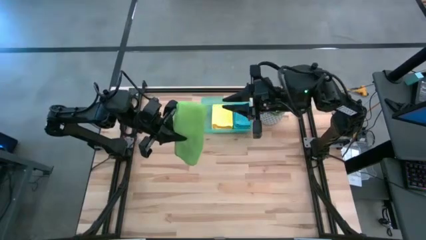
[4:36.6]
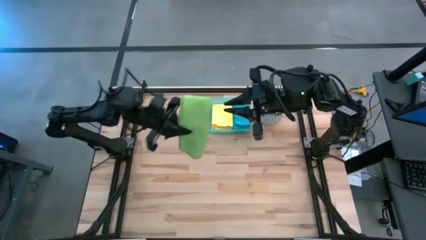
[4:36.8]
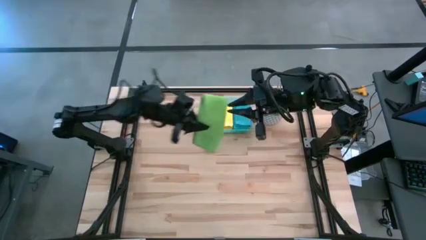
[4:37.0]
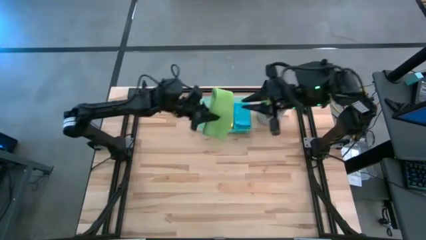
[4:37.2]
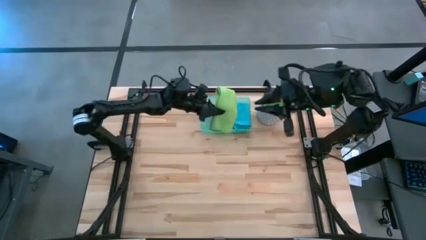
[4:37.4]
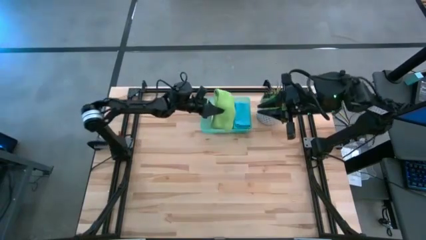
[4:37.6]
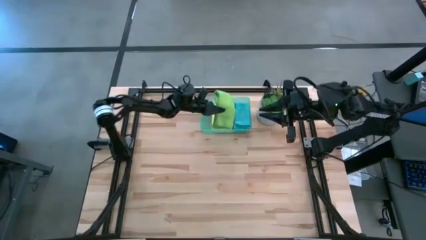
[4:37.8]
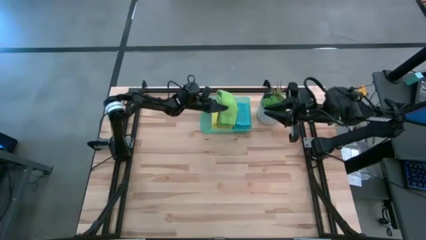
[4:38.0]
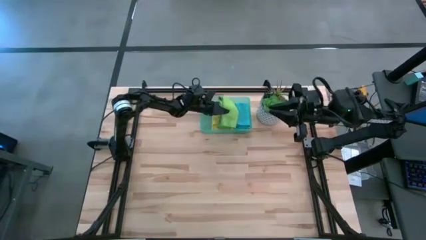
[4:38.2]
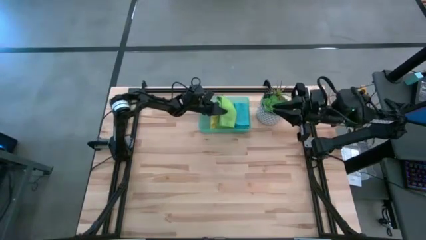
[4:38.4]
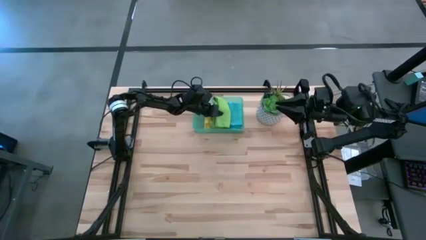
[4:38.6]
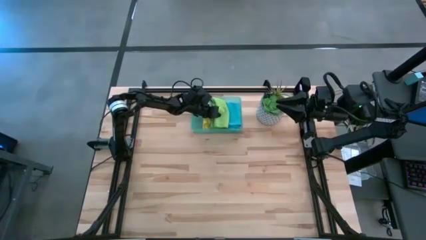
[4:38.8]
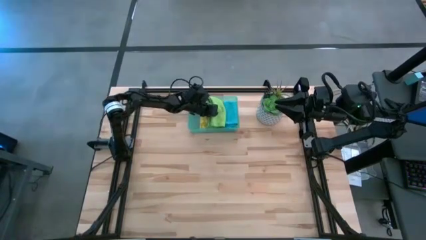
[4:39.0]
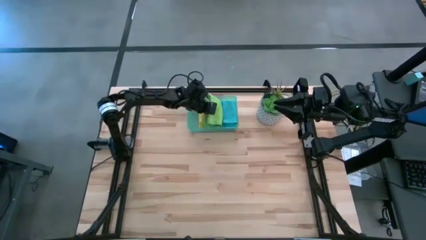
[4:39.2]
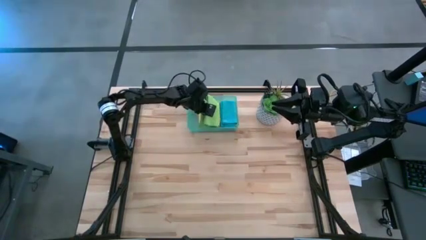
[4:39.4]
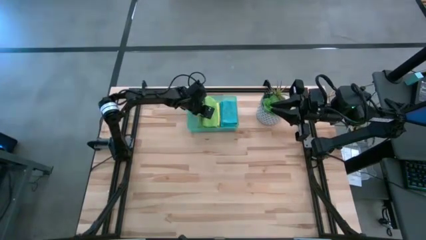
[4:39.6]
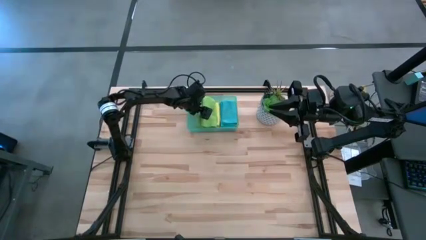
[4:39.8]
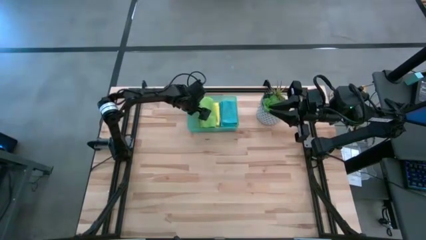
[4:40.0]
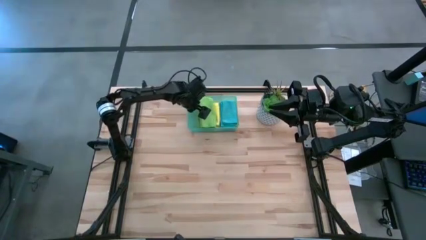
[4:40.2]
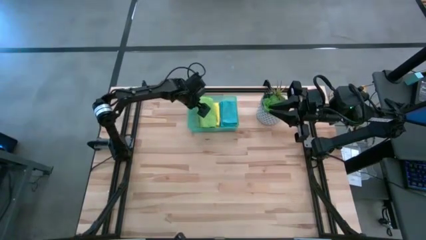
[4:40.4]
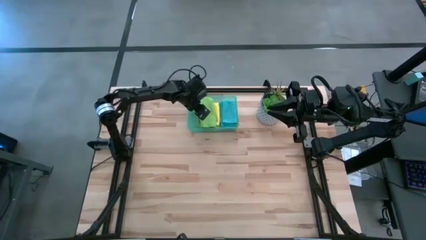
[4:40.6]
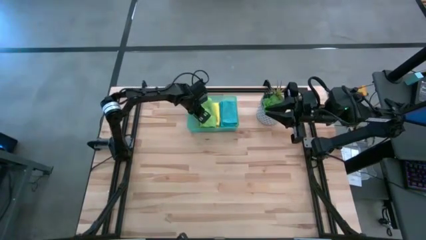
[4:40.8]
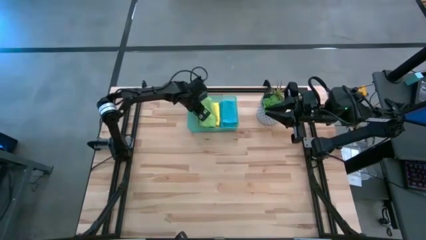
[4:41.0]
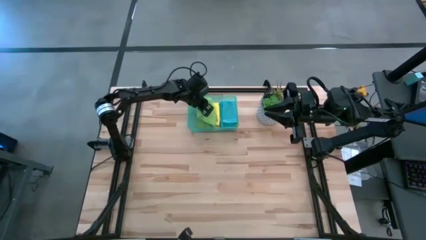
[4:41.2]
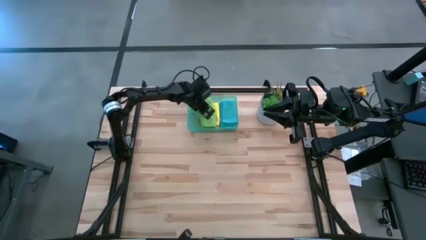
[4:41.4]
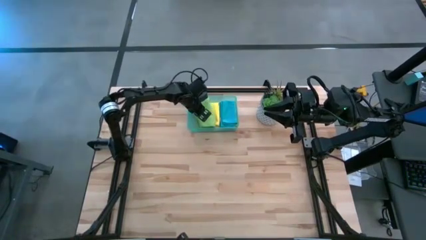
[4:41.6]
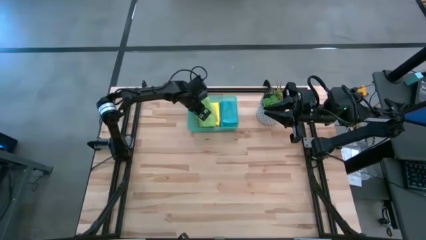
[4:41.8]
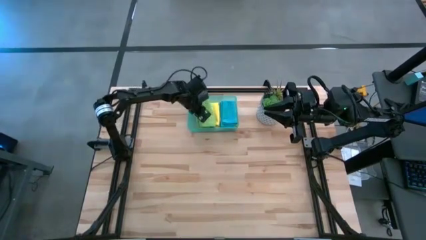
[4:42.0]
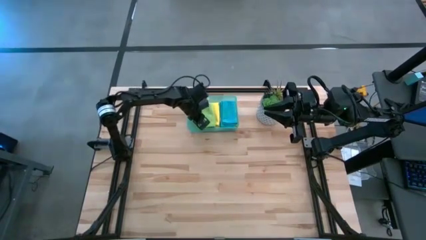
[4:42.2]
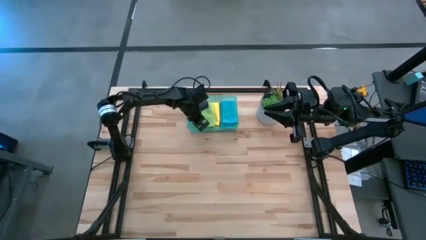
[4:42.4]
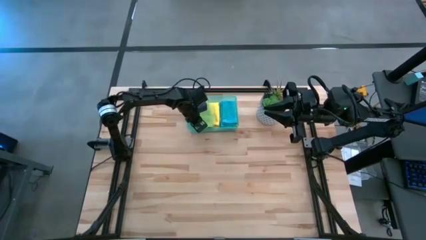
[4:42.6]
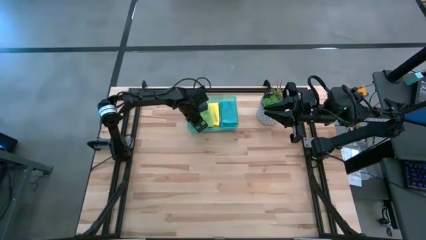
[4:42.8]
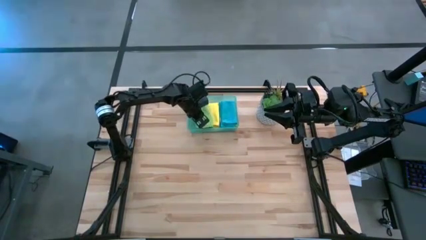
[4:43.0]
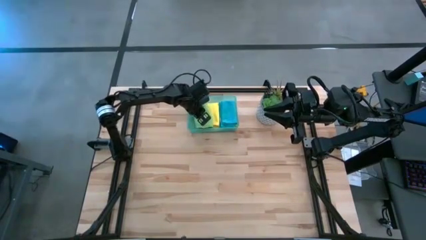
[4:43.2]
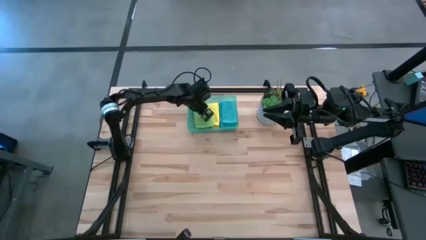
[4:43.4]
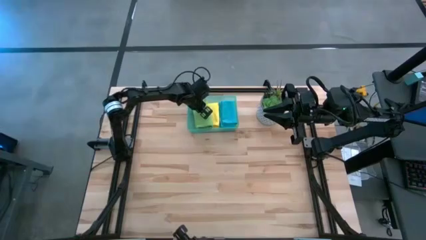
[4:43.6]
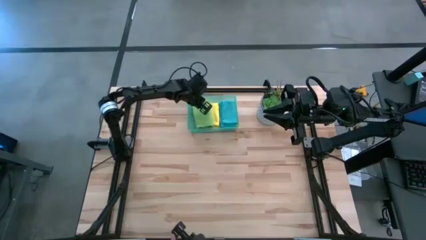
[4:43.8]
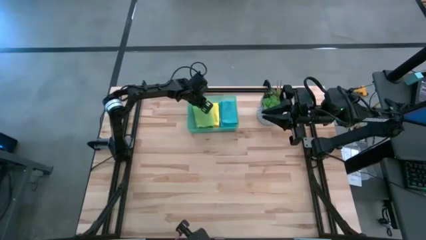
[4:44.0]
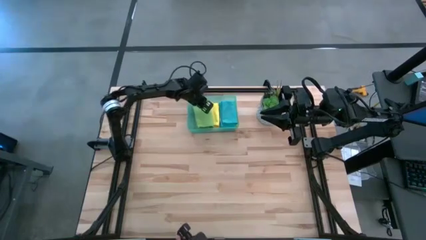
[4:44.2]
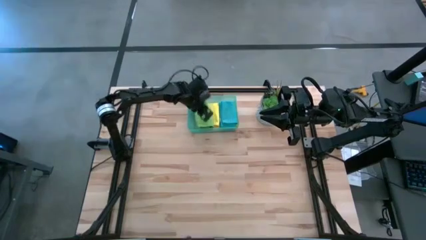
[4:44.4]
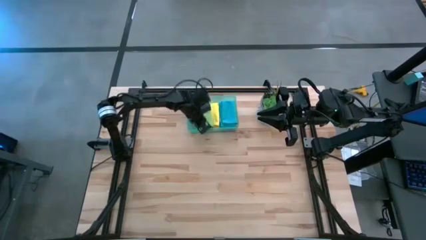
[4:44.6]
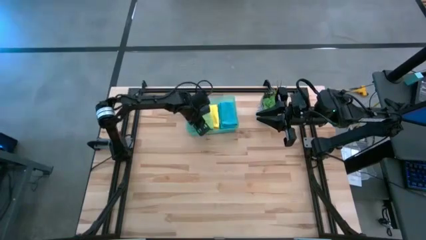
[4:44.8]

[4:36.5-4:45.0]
Task: Fold microfiber towels
Put the green microfiber cloth into the blue bin

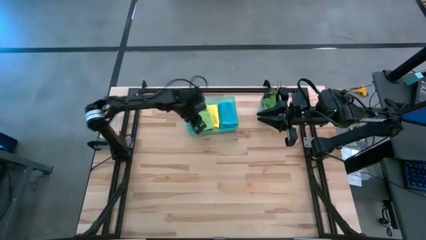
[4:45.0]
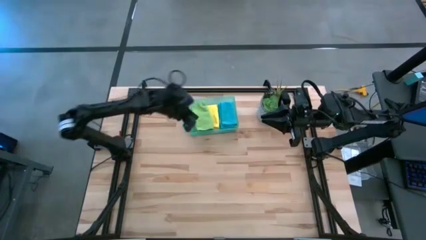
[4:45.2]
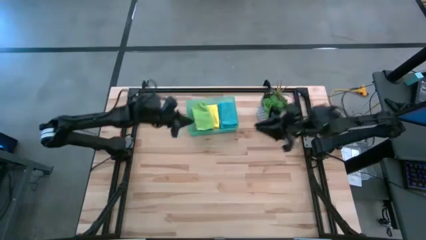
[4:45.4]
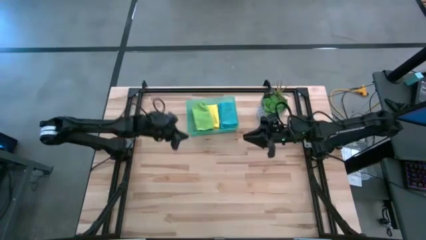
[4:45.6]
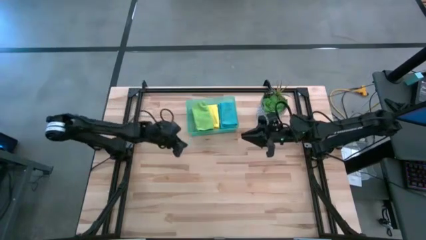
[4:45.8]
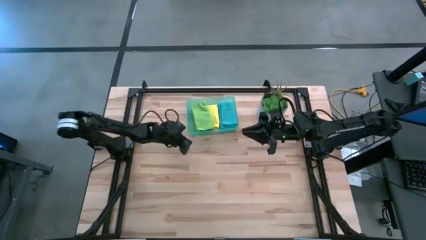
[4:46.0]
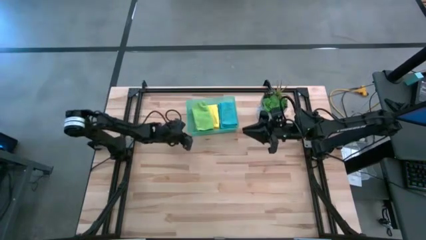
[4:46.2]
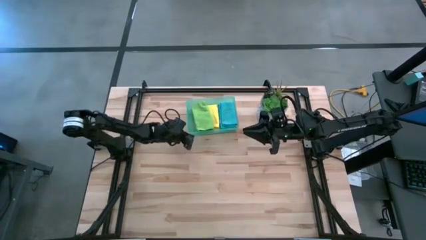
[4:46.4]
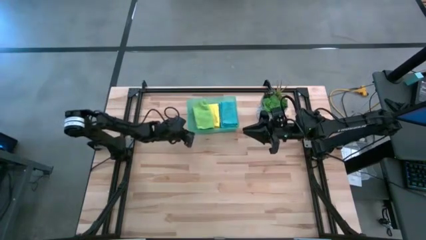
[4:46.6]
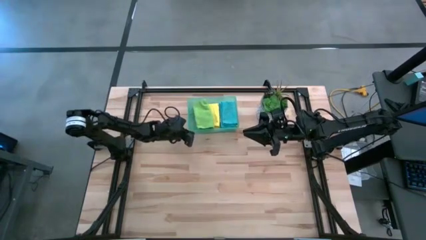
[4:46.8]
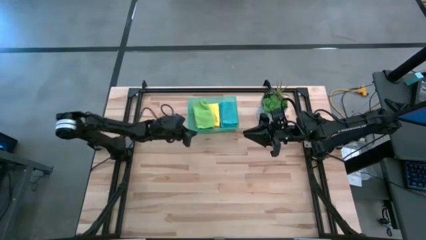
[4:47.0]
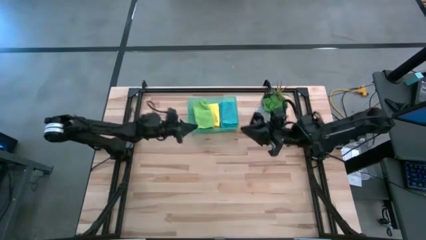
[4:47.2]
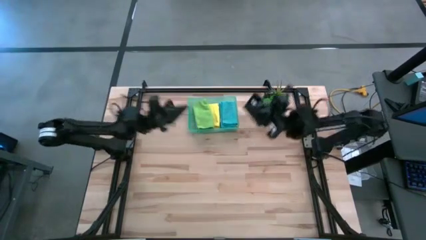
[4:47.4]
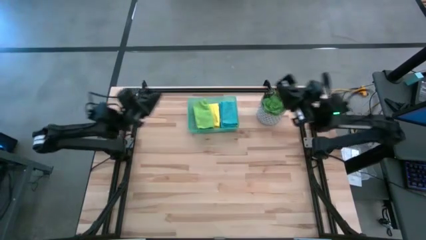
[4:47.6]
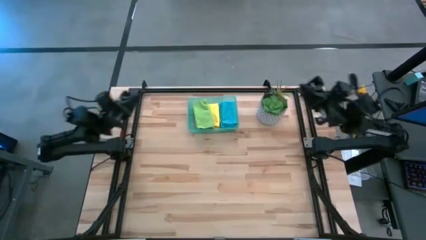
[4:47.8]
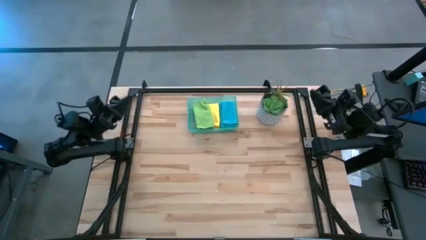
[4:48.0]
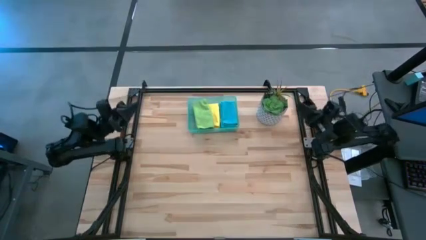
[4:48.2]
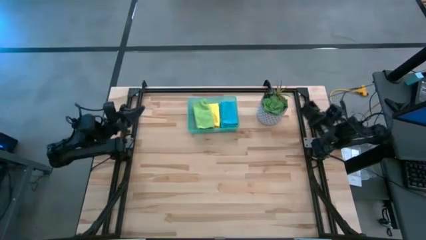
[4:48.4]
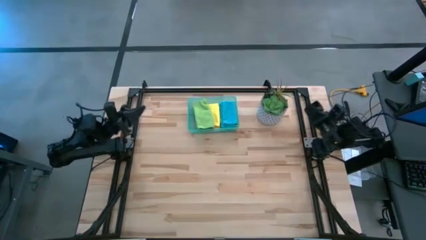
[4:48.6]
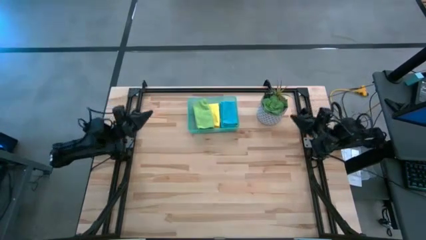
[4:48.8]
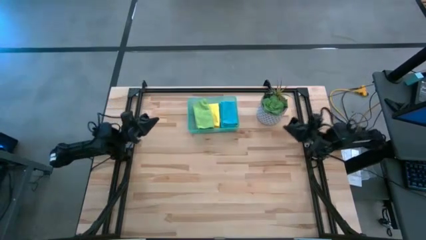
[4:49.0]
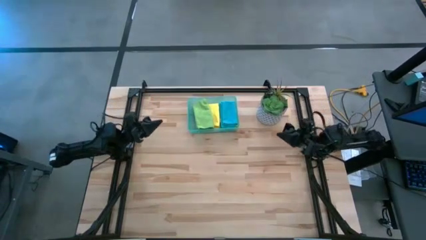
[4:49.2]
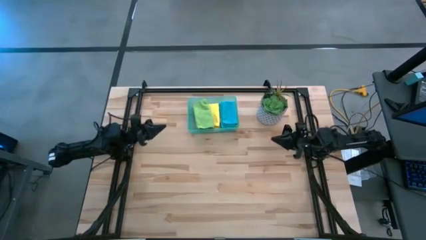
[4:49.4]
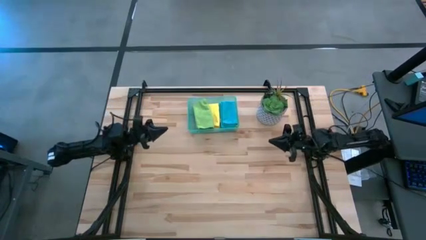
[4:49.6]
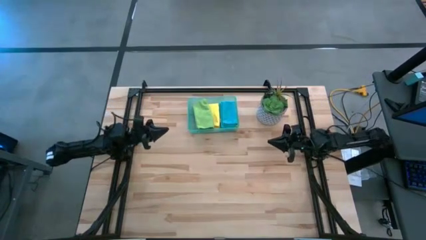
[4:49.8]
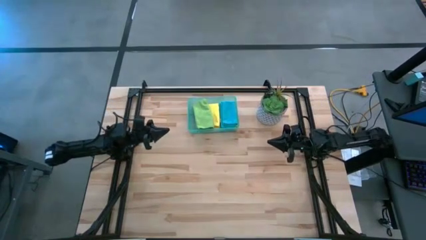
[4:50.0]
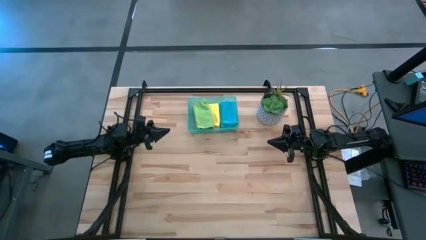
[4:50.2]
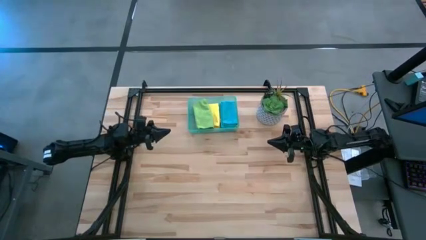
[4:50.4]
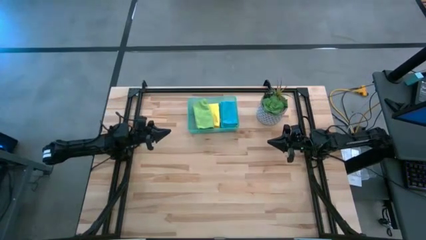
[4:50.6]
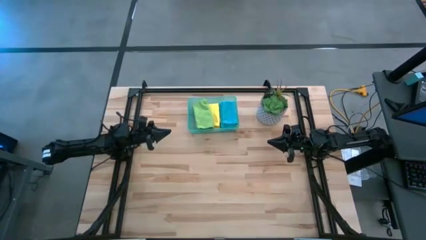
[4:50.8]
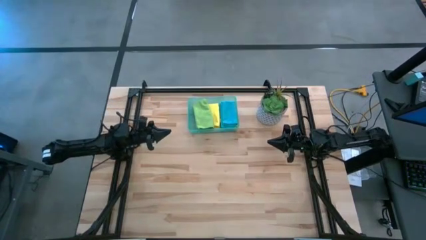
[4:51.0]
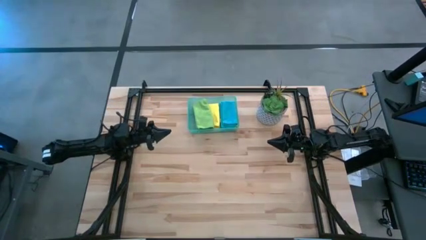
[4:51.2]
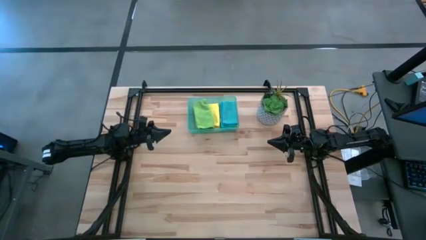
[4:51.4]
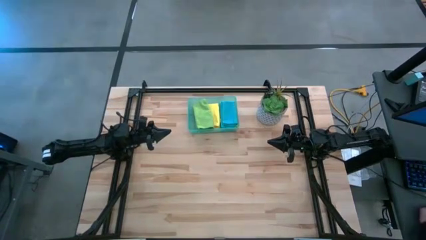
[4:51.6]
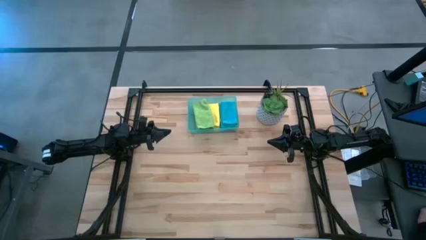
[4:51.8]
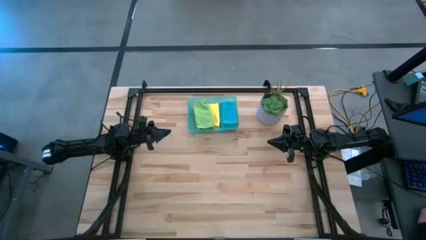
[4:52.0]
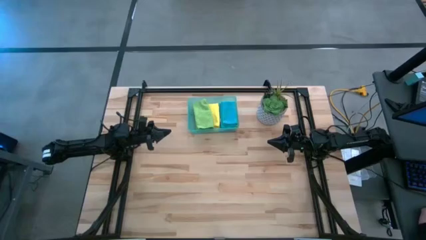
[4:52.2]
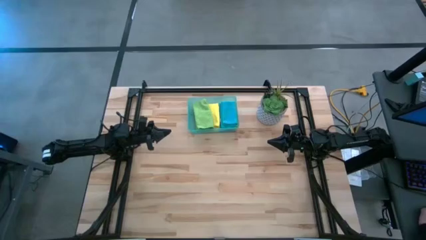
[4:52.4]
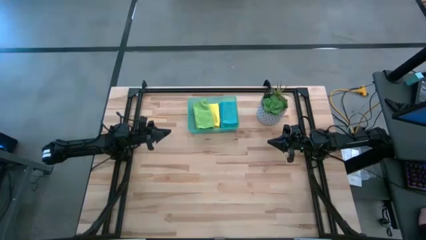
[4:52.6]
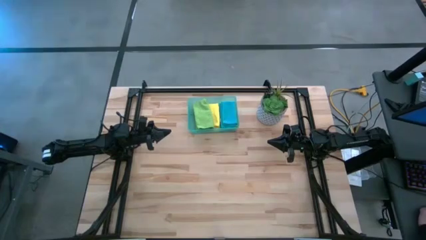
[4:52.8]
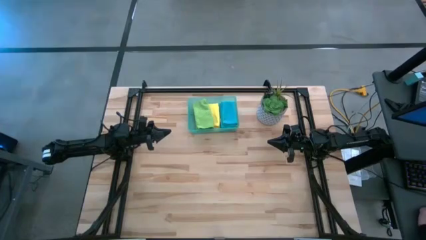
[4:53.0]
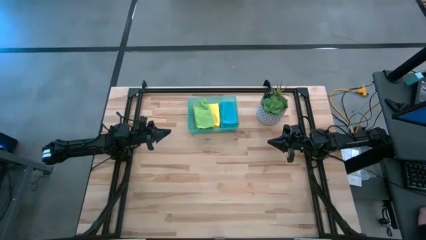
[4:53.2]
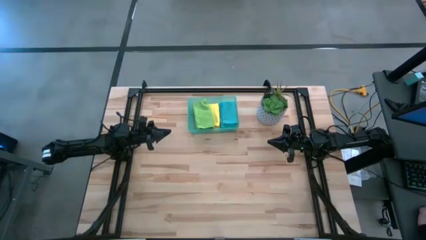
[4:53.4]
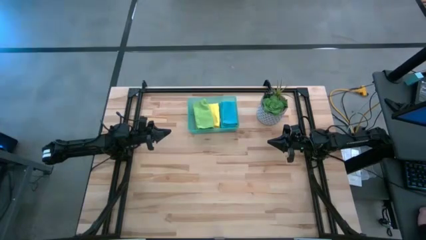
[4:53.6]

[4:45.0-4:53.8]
Return to Home Position
